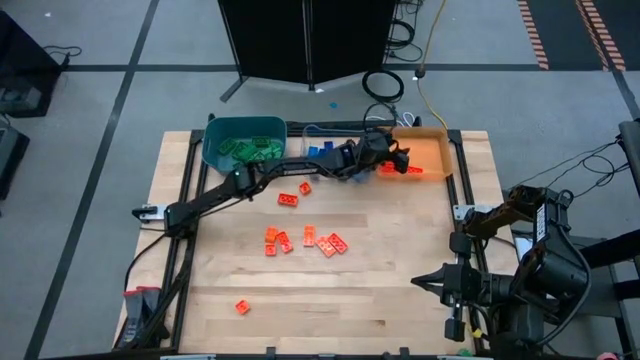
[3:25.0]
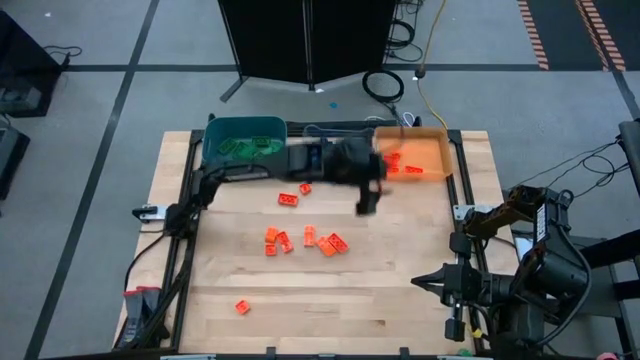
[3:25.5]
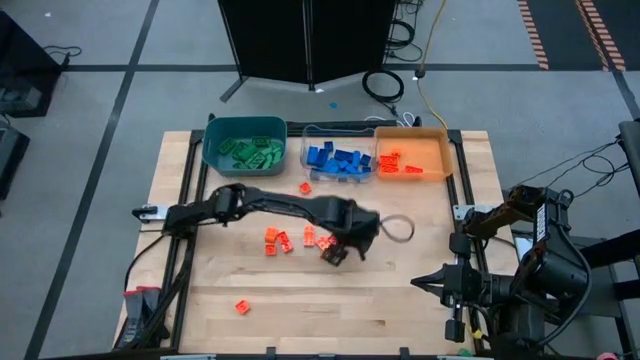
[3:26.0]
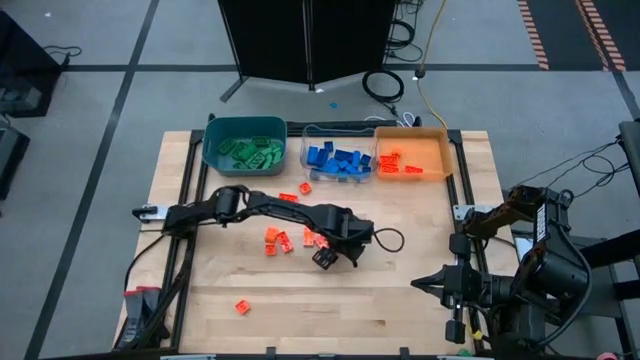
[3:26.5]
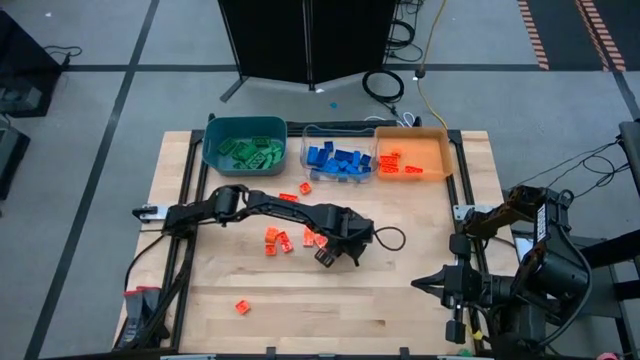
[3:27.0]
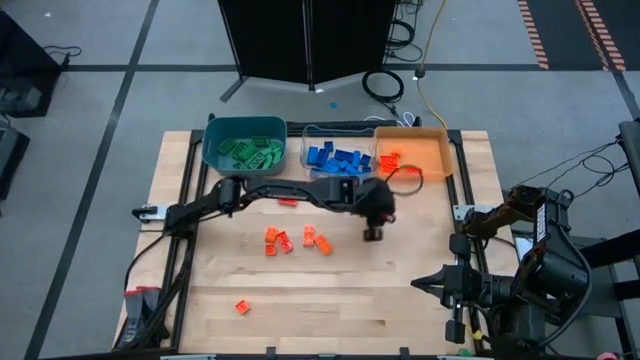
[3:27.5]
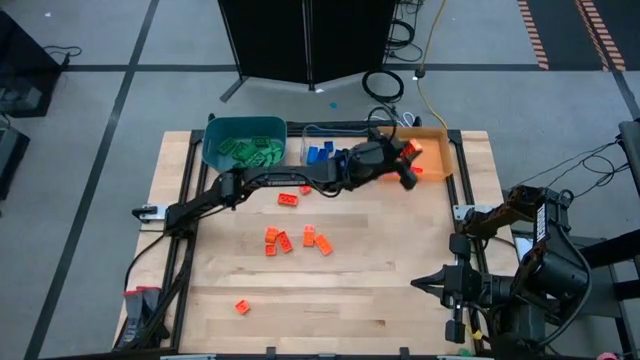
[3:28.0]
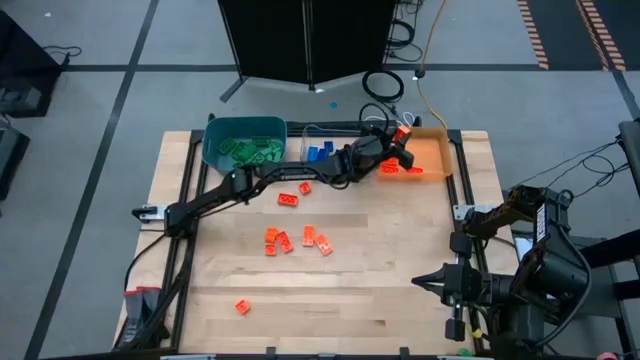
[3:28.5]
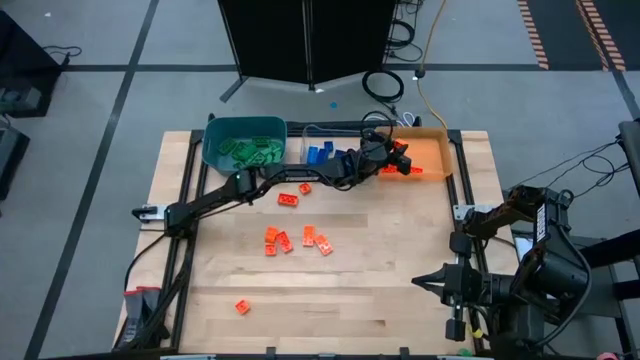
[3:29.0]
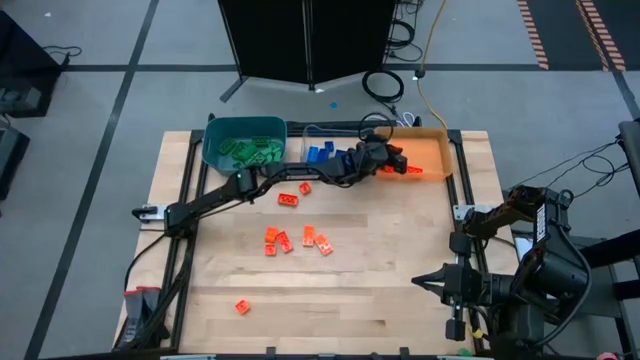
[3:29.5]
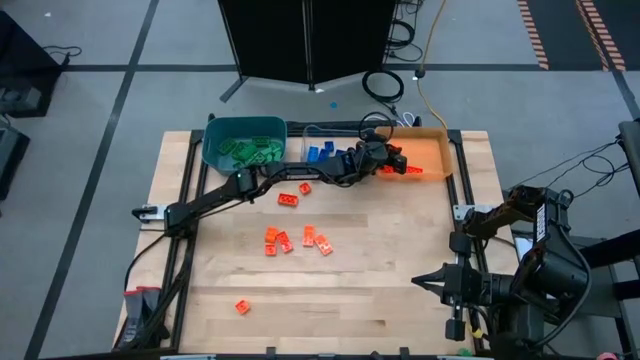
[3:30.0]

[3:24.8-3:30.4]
Task: Sort blocks
Put the orange game piece into the orange transparent bin

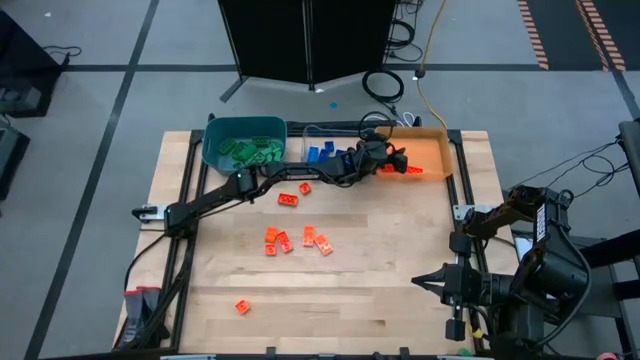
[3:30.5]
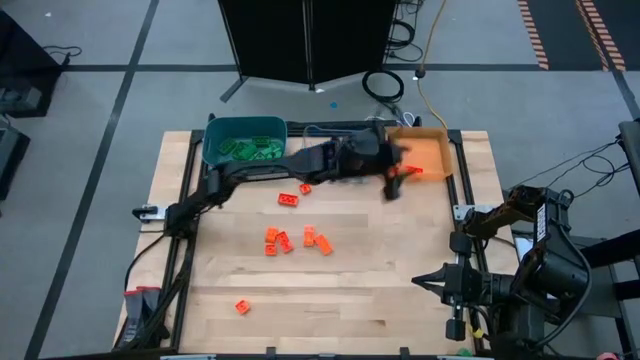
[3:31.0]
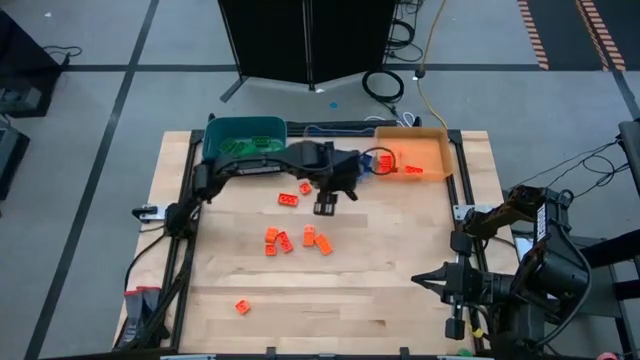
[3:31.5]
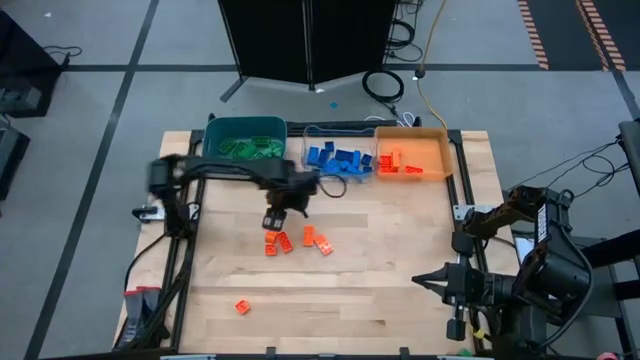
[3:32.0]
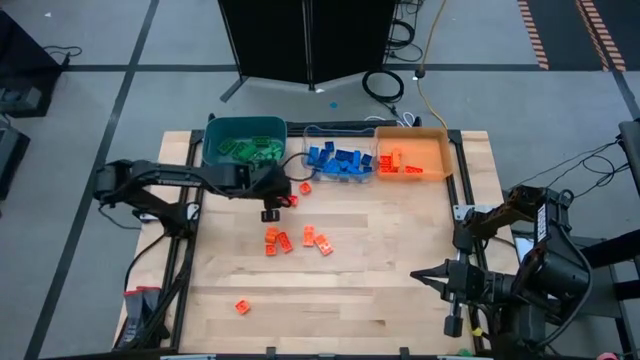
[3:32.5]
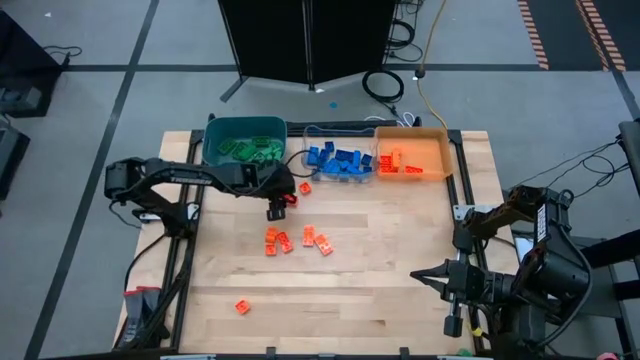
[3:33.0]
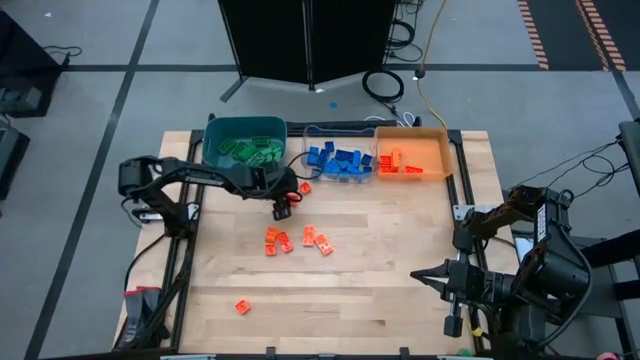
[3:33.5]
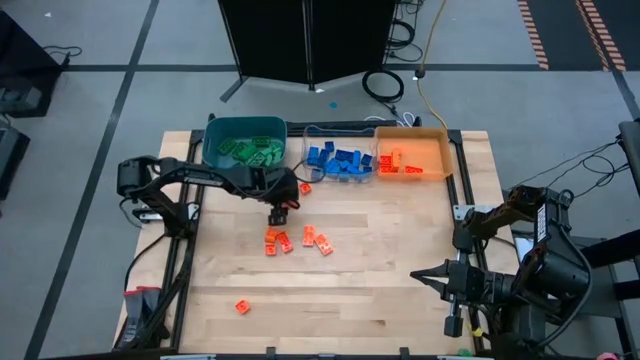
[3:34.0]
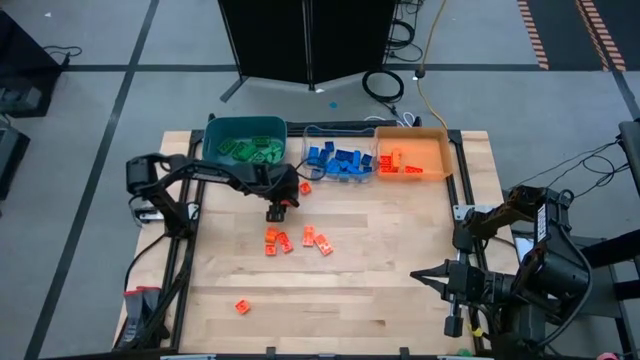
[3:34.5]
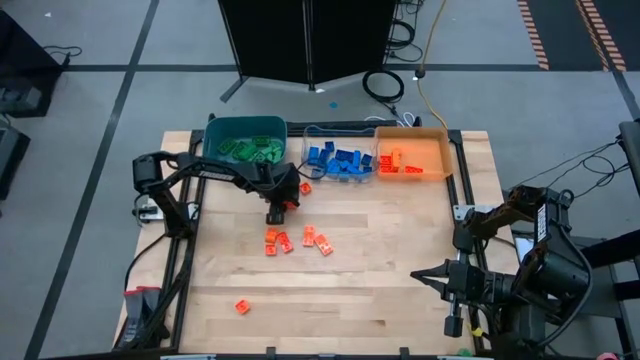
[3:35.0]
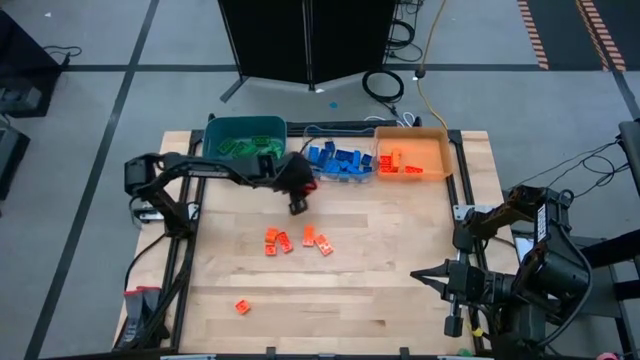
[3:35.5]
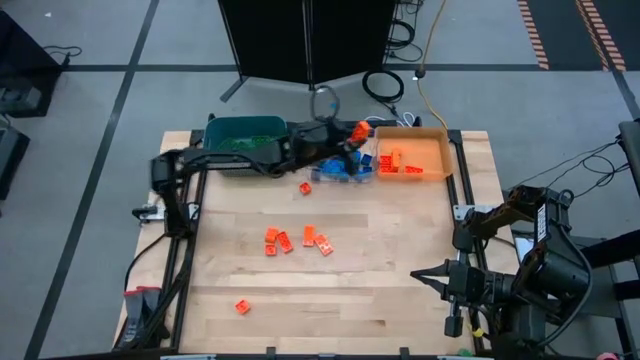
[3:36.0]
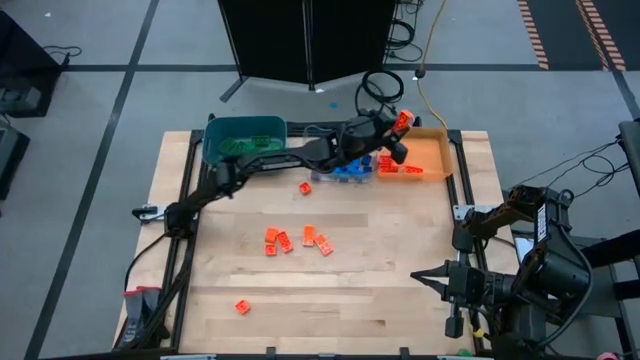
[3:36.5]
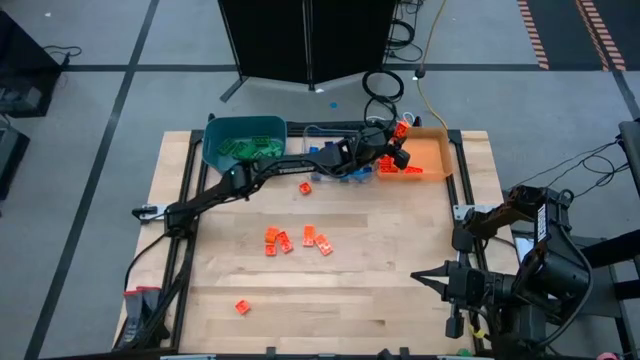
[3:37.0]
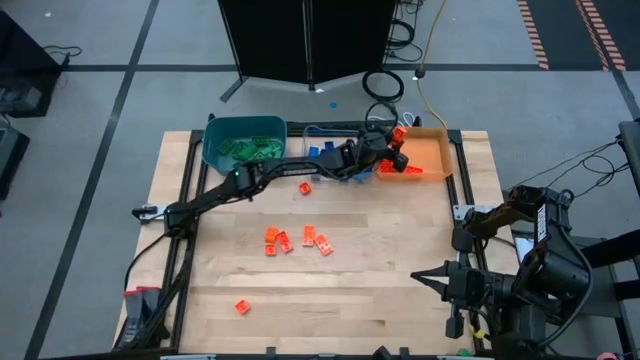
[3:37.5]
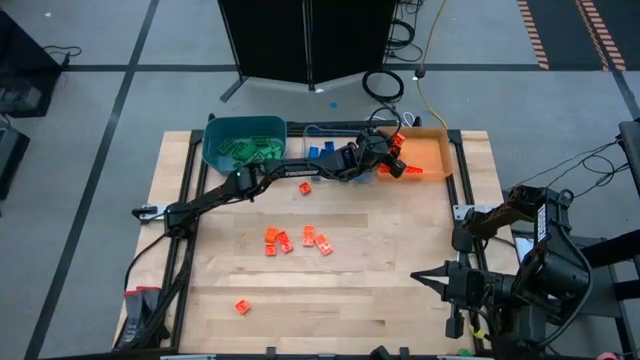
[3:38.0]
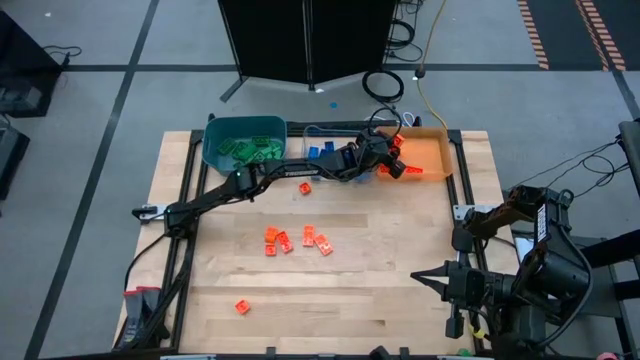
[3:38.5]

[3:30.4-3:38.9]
Put the orange game piece into the orange transparent bin

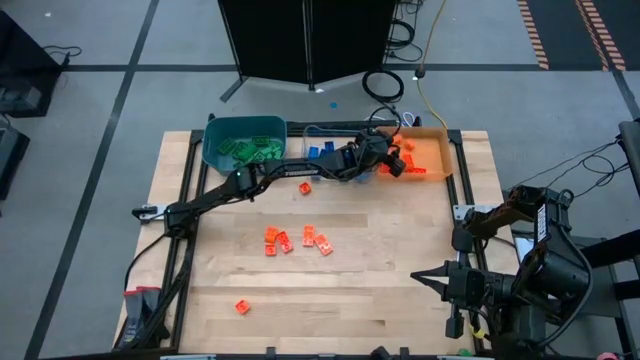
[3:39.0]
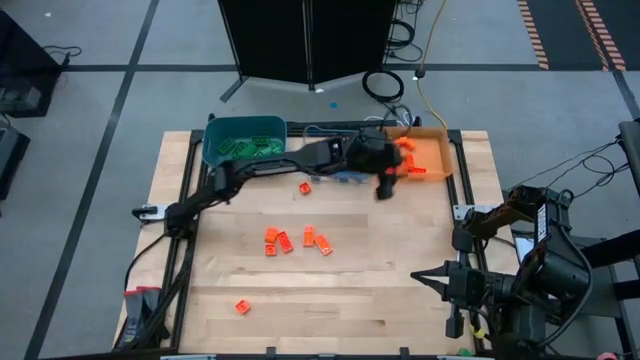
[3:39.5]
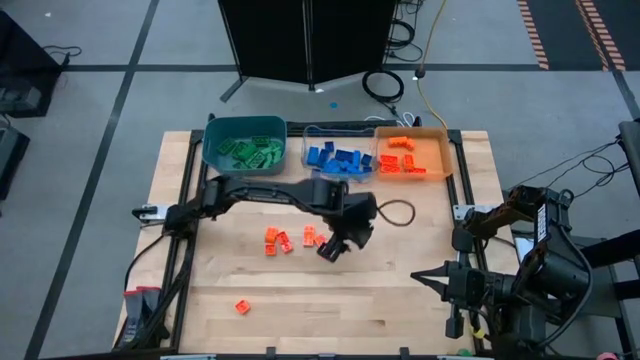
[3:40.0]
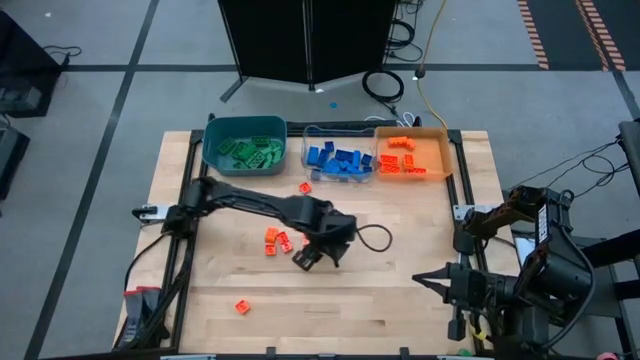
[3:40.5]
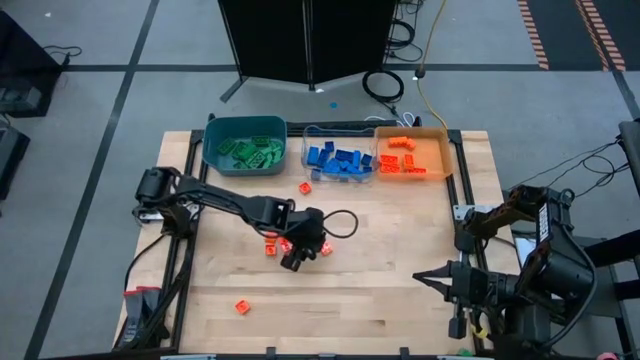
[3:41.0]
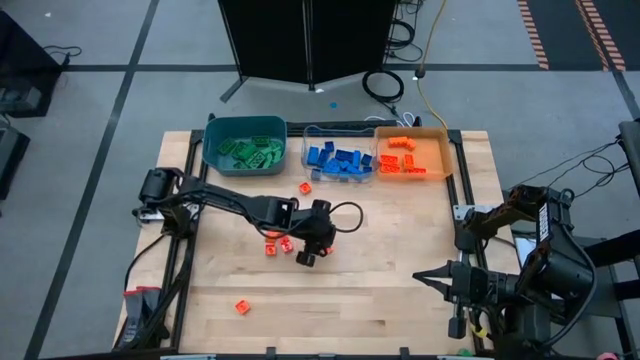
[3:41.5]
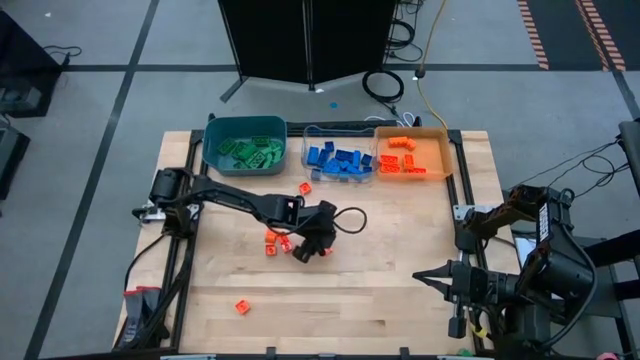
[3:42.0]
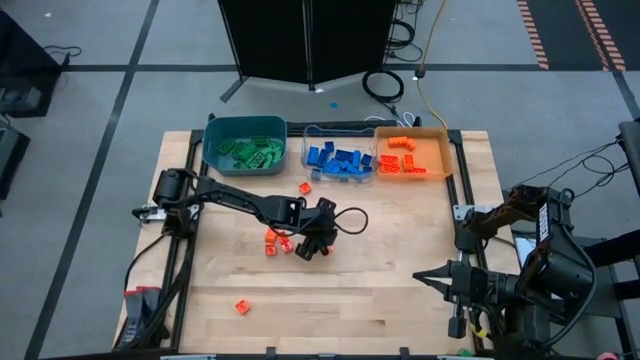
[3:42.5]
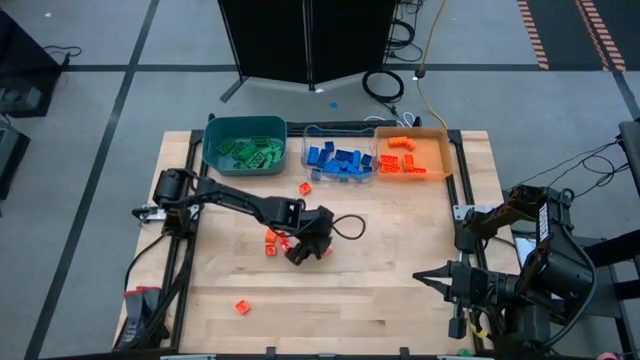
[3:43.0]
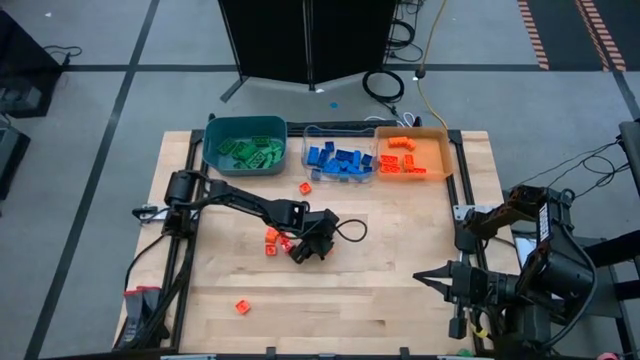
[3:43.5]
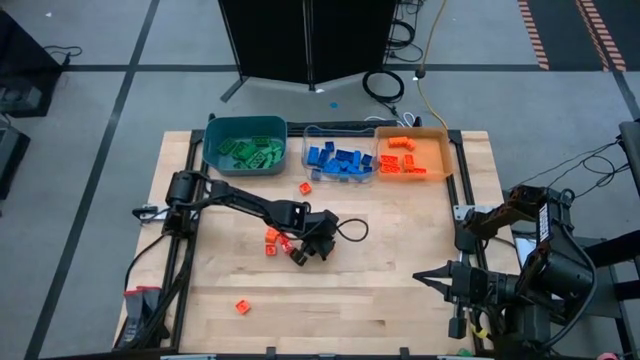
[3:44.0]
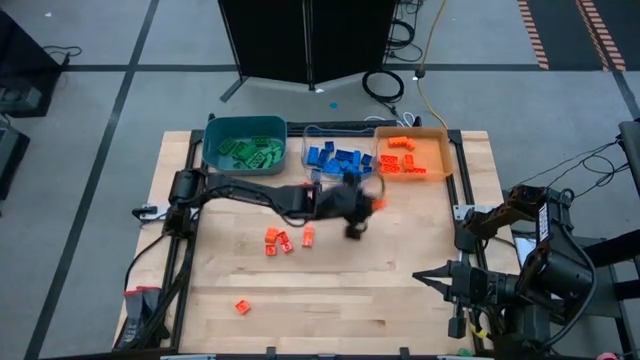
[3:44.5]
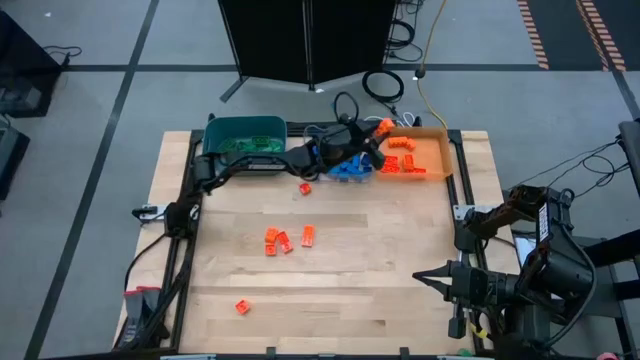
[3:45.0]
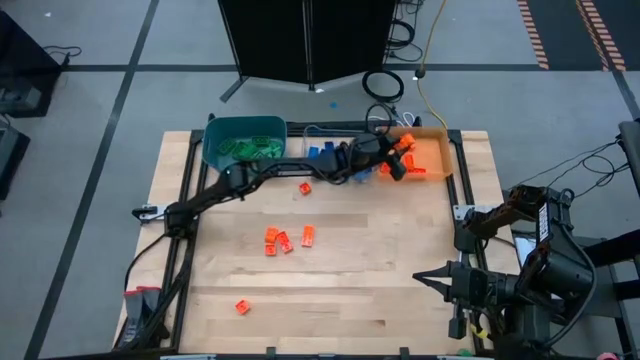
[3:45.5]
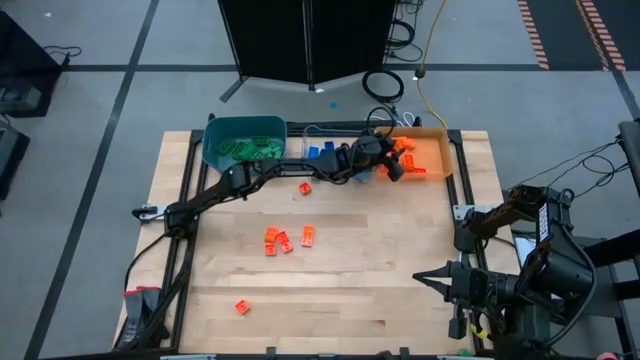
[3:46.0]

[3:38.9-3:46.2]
Put the orange game piece into the orange transparent bin
